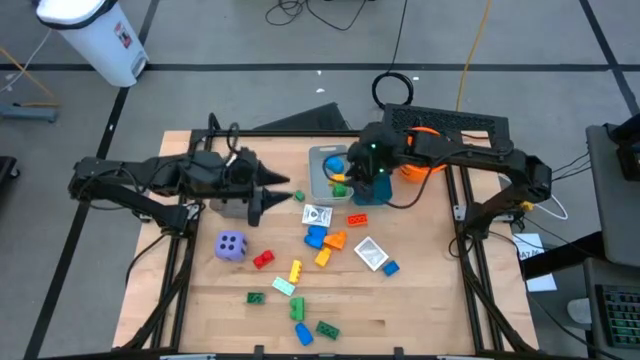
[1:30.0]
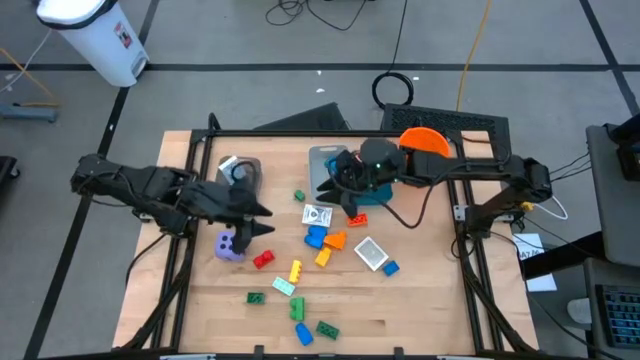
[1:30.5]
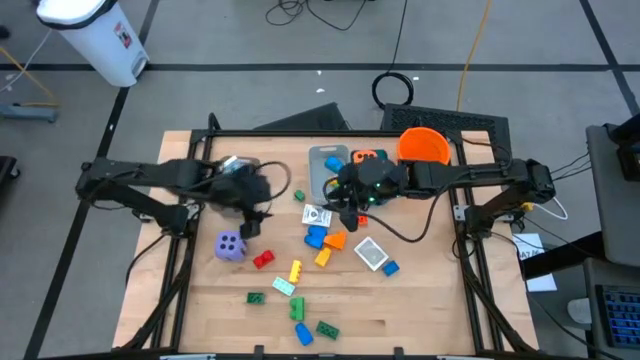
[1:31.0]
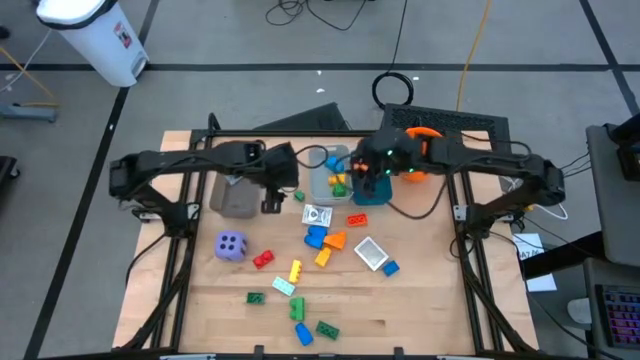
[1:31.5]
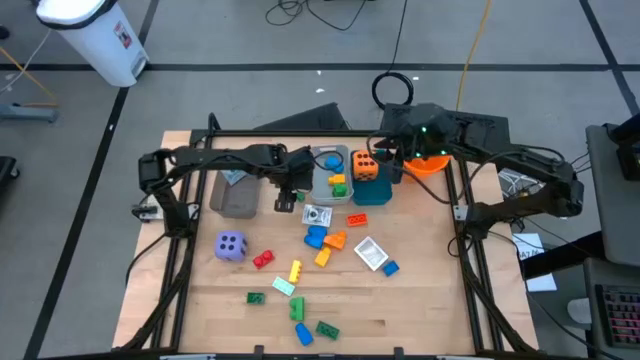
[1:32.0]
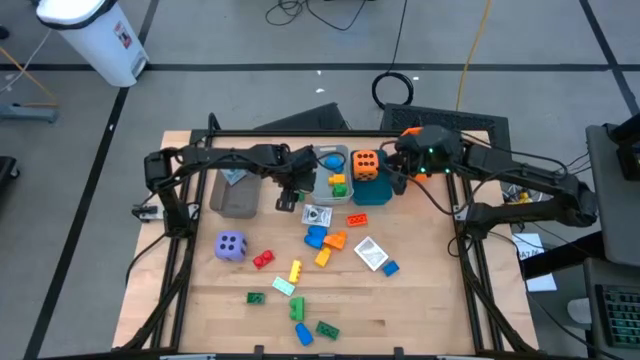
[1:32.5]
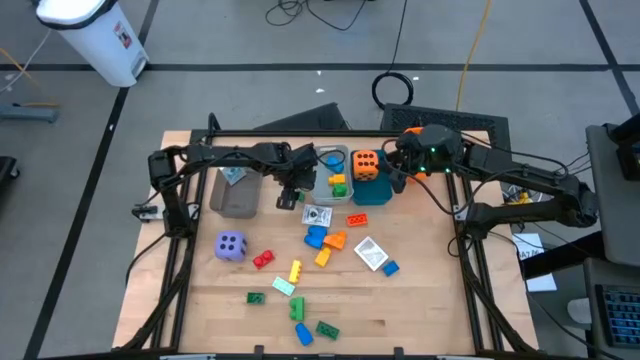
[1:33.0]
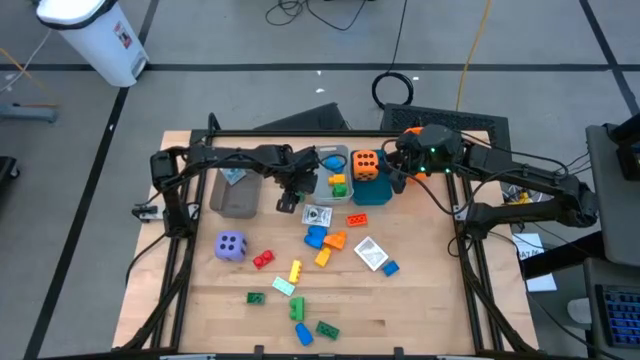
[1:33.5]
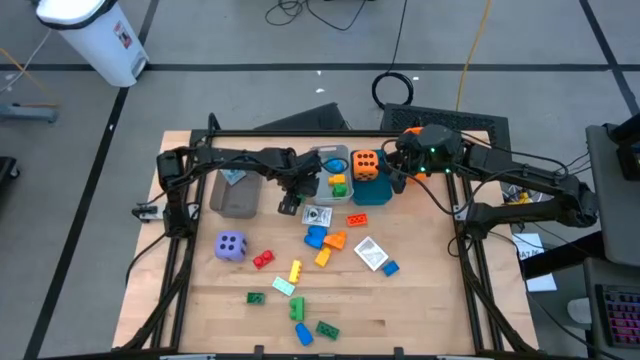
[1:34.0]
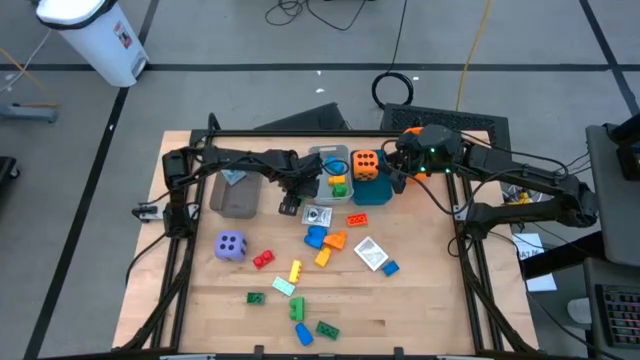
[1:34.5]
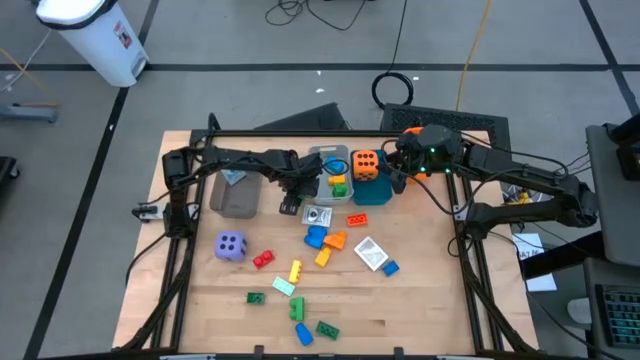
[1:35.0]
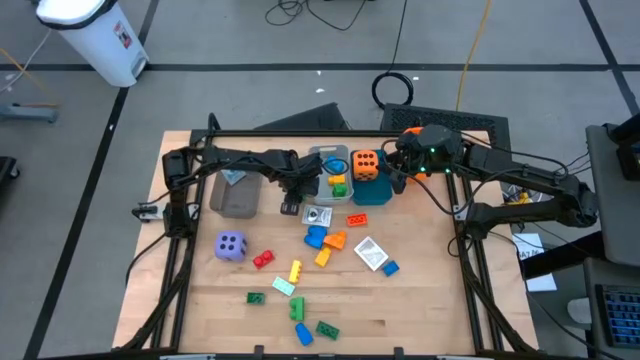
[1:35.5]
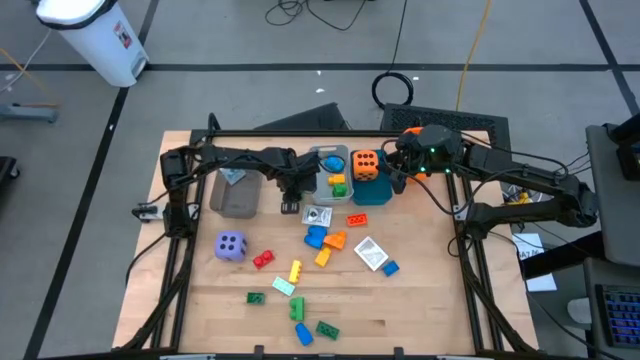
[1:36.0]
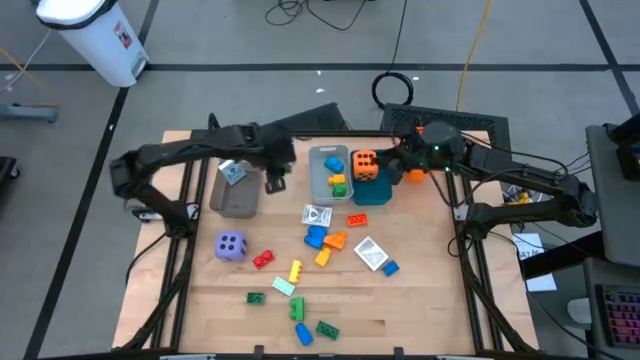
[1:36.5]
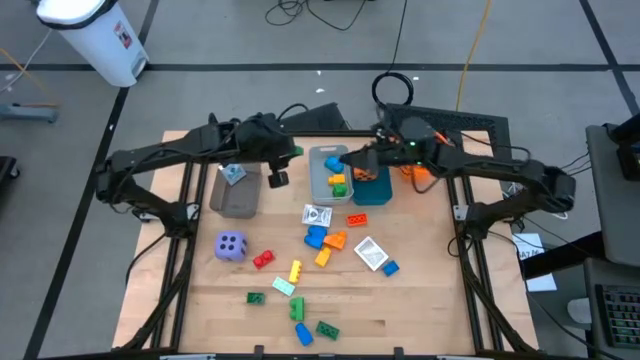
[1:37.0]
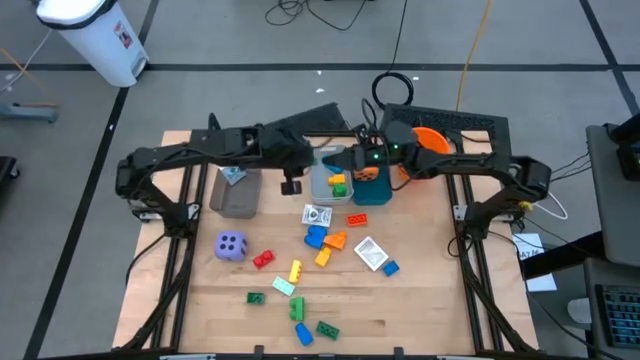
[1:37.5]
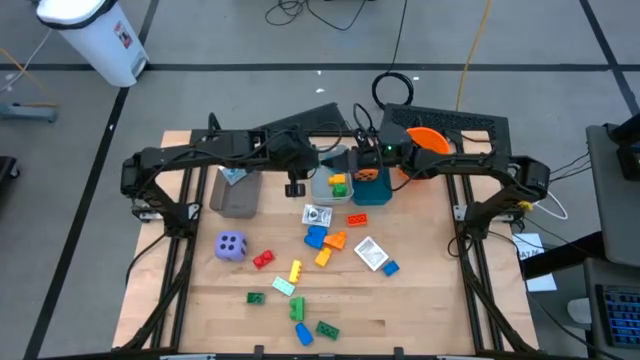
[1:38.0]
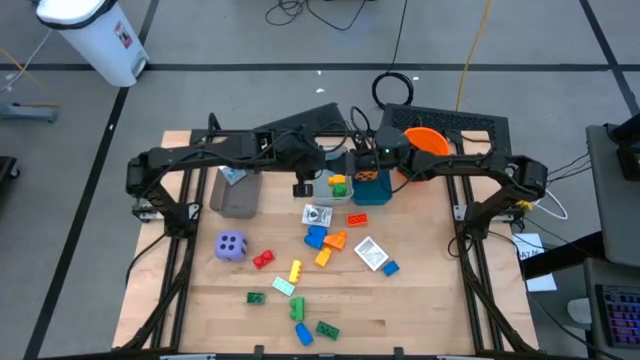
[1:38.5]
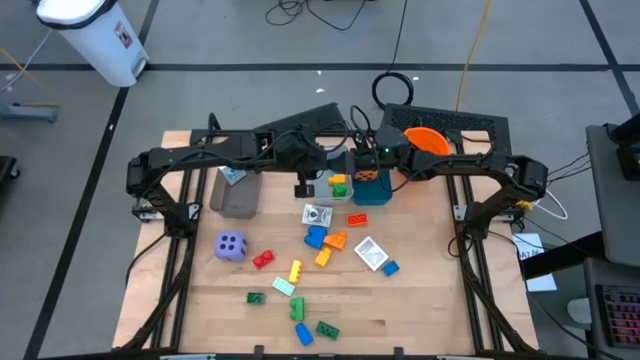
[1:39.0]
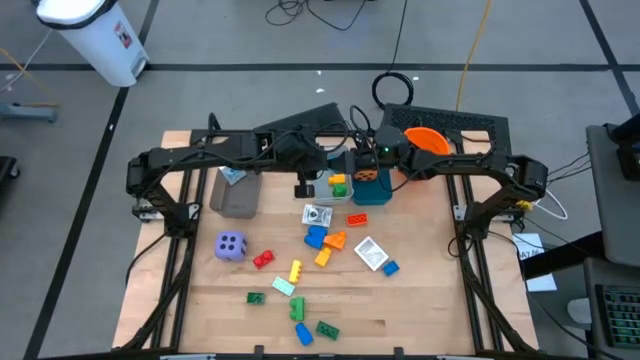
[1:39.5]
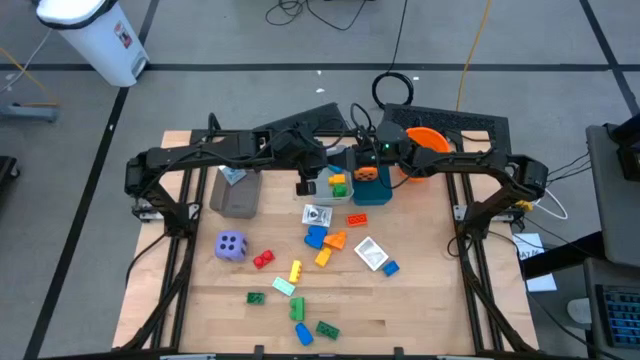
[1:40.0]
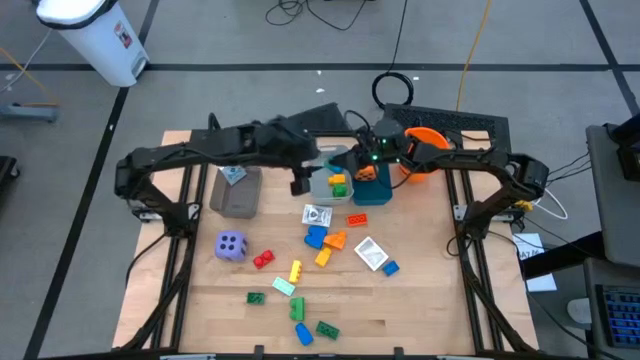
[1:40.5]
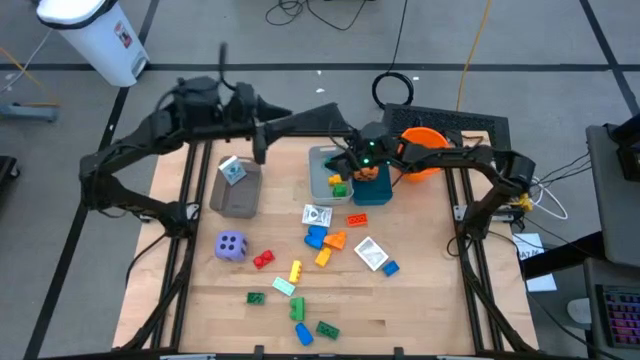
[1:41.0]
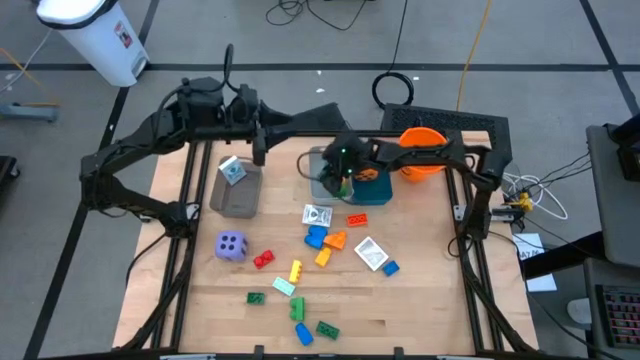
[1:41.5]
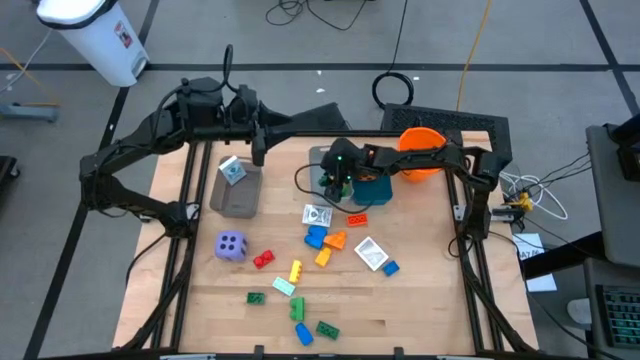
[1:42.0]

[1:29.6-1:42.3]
Task: Pick & Place Toys
Put the green game piece into the gray bin

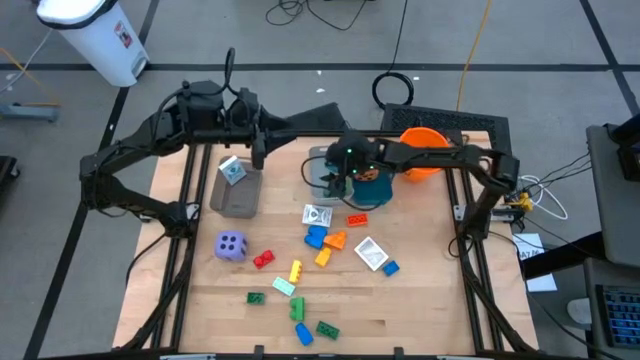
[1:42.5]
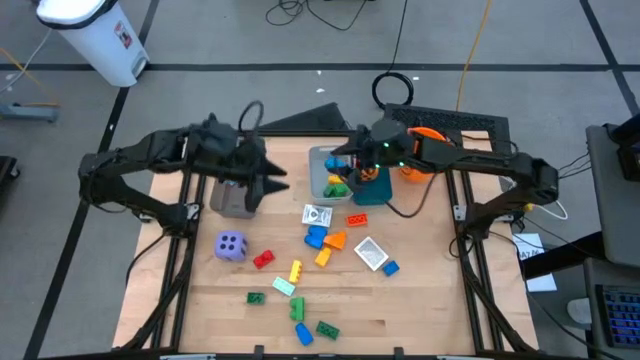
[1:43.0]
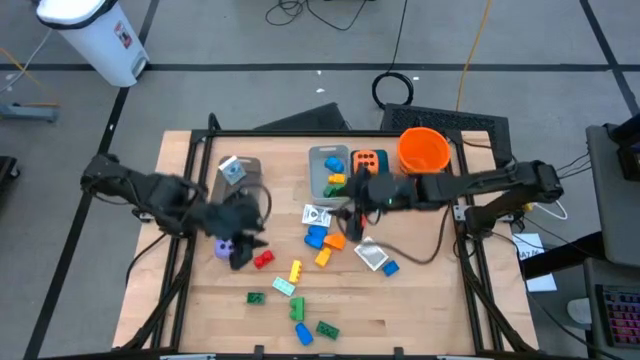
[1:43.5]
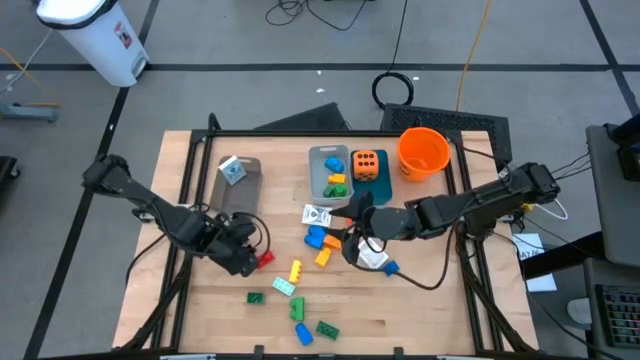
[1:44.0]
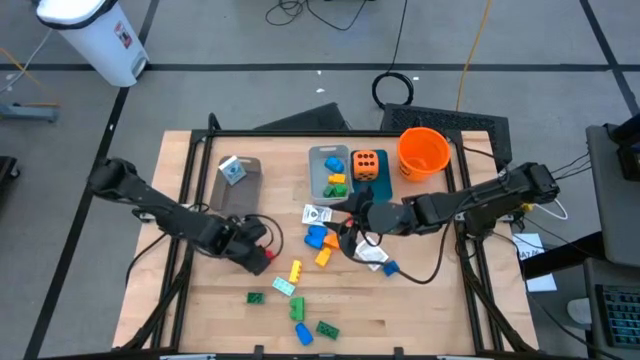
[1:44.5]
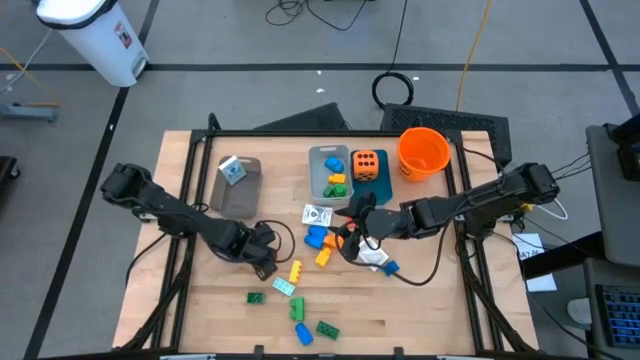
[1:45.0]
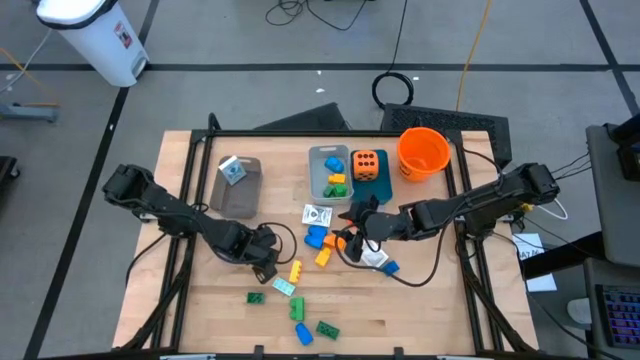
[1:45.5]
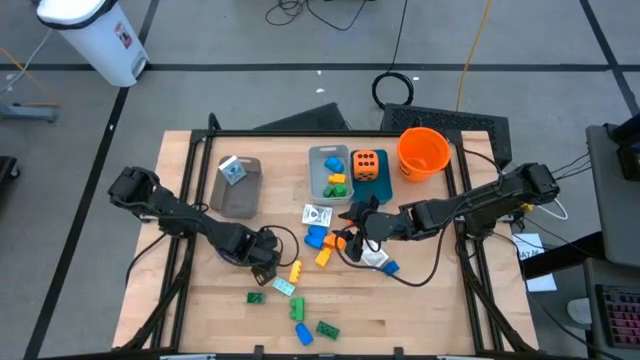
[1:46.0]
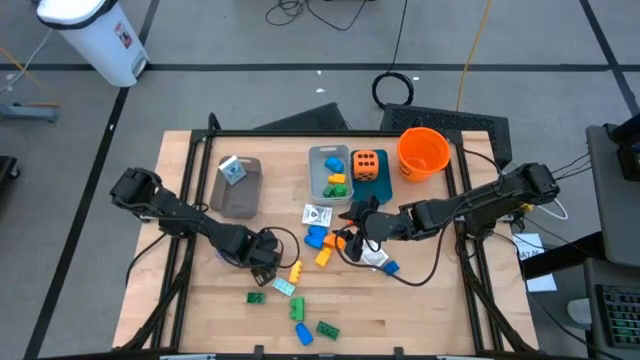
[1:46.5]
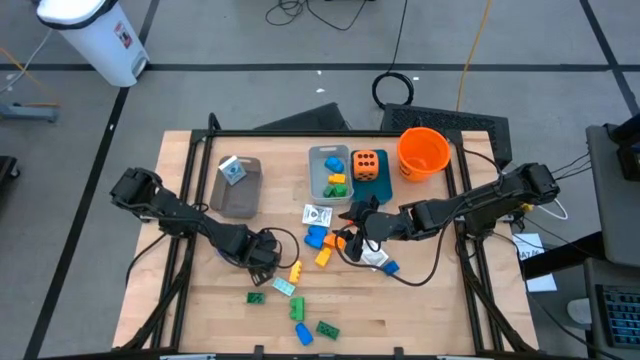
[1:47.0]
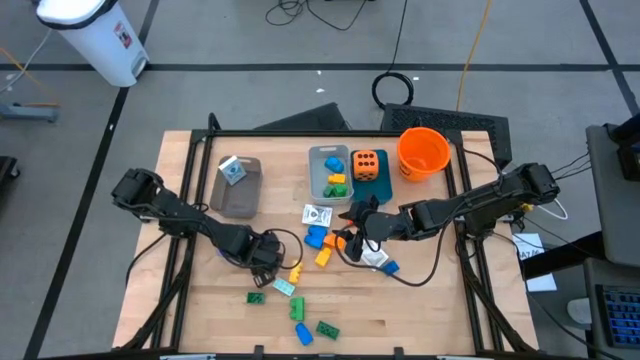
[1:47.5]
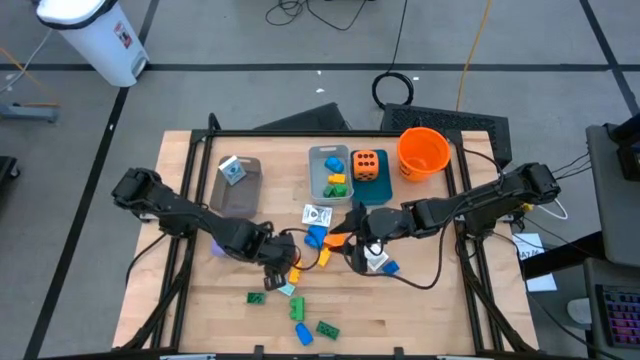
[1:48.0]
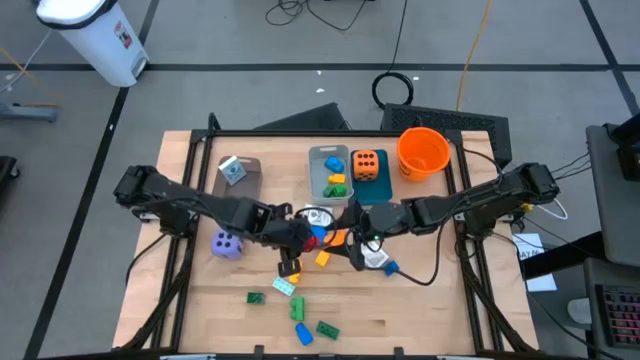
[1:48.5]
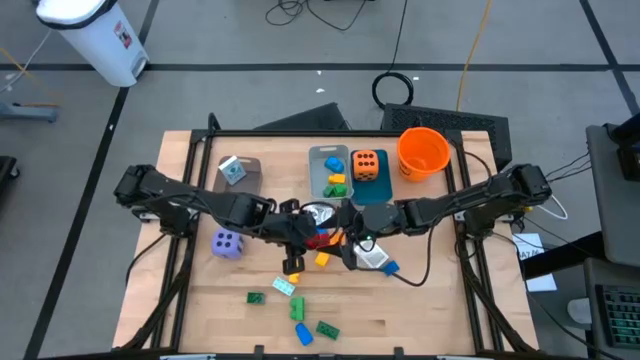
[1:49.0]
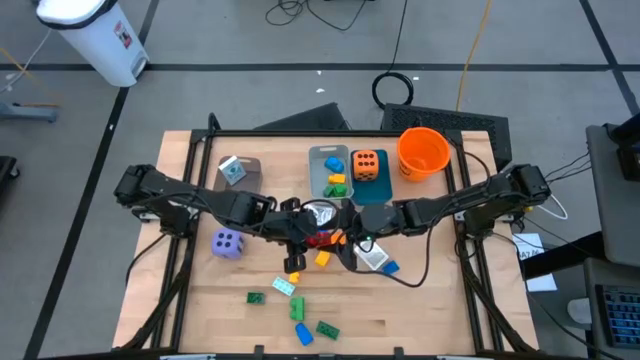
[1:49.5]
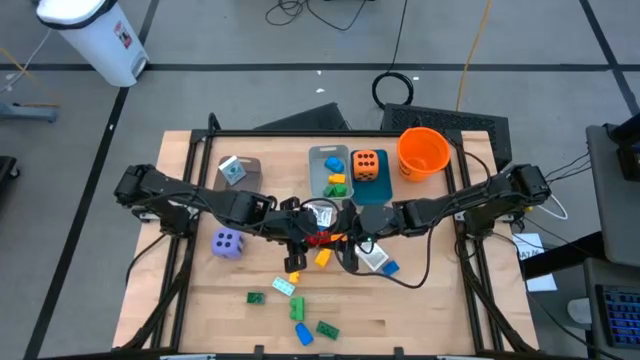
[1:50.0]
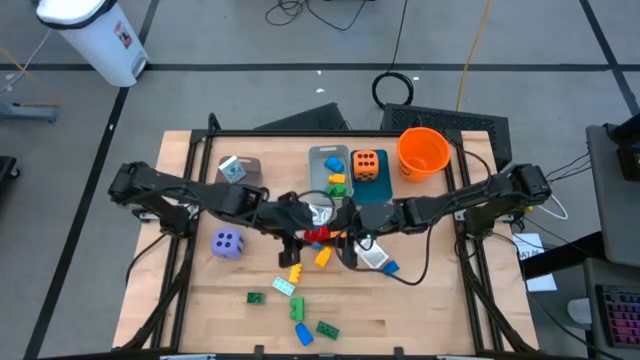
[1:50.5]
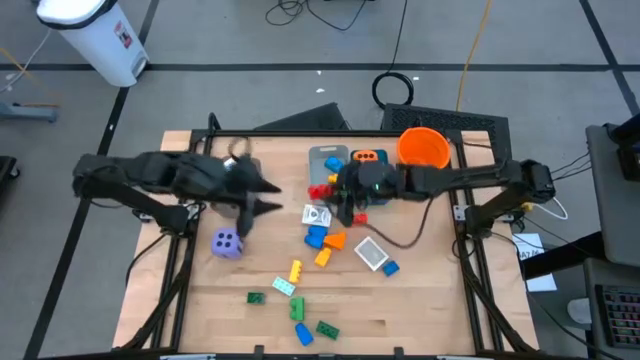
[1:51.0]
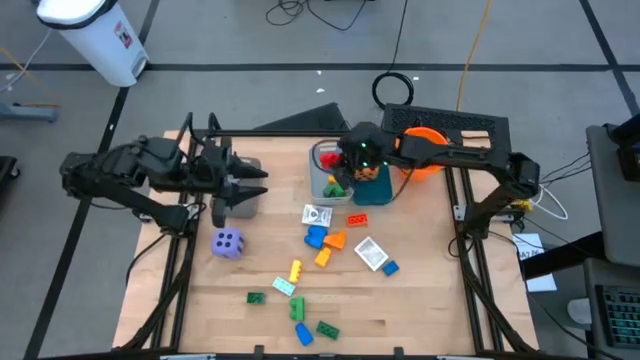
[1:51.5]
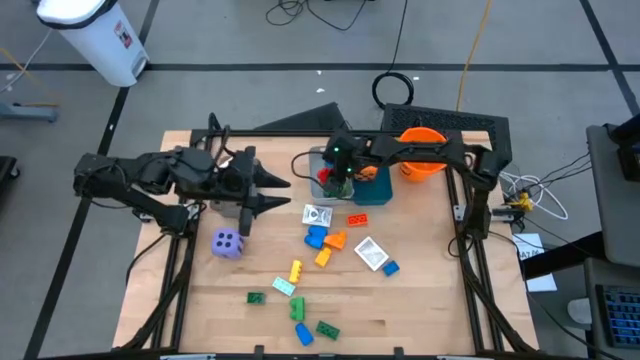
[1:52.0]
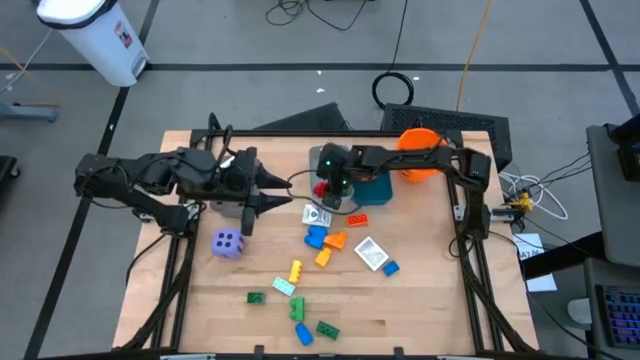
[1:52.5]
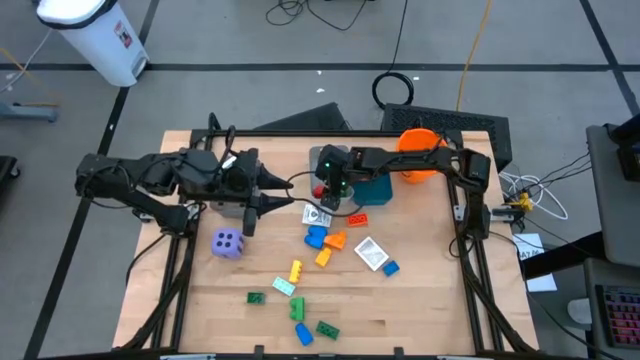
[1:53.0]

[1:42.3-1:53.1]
Put the red game piece into the gray bin
